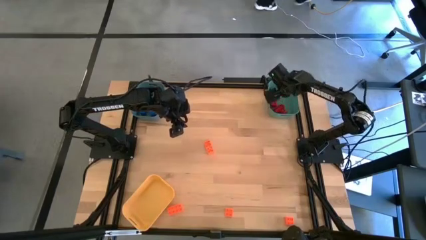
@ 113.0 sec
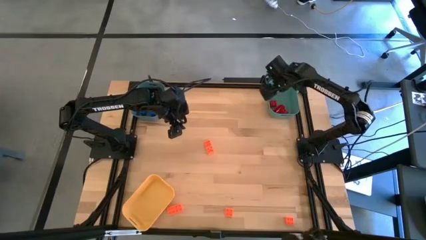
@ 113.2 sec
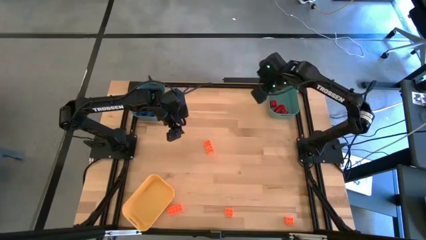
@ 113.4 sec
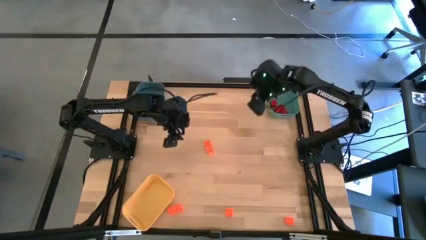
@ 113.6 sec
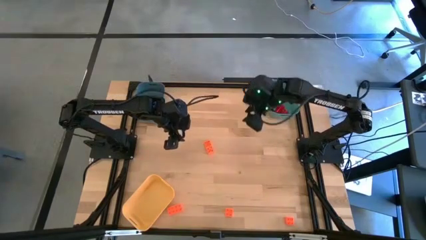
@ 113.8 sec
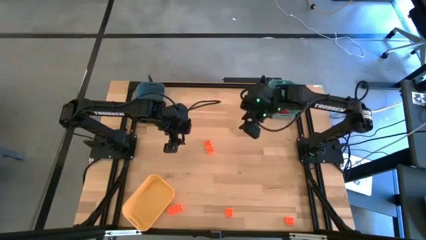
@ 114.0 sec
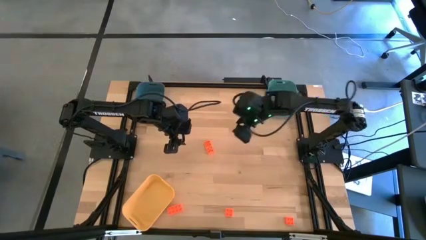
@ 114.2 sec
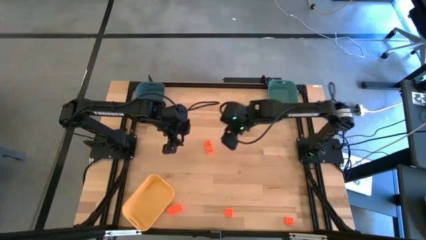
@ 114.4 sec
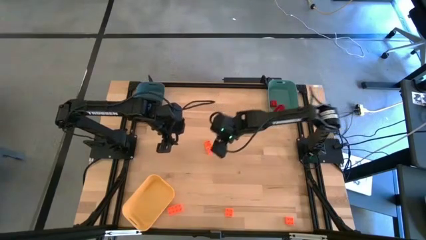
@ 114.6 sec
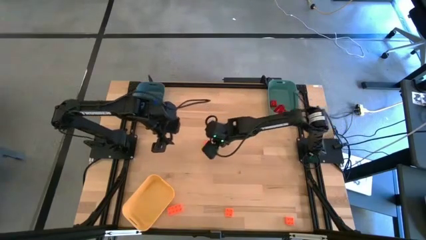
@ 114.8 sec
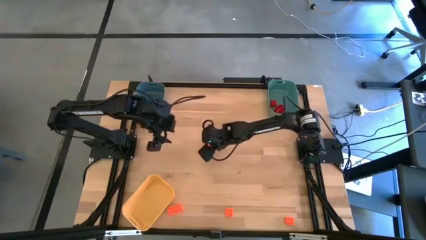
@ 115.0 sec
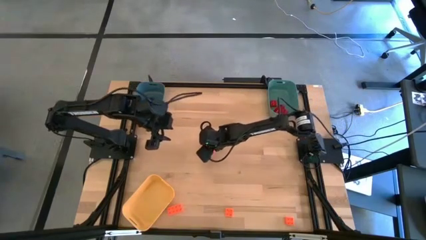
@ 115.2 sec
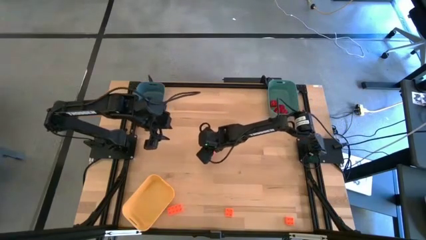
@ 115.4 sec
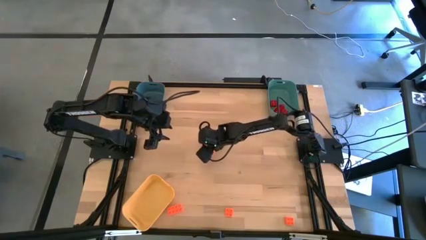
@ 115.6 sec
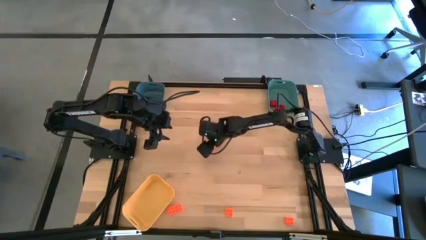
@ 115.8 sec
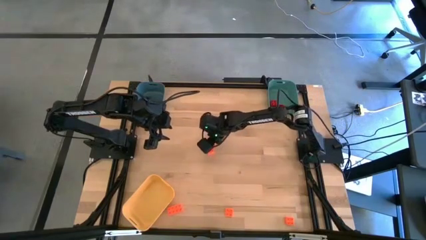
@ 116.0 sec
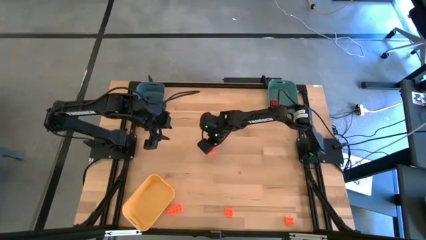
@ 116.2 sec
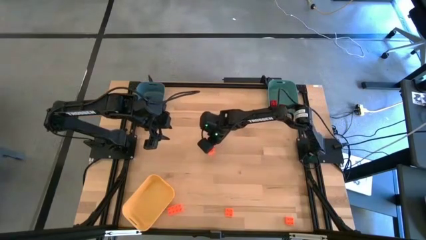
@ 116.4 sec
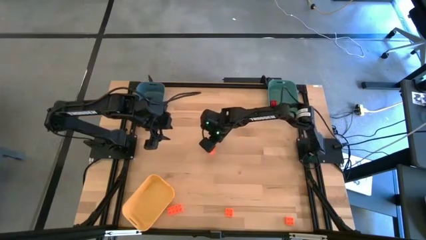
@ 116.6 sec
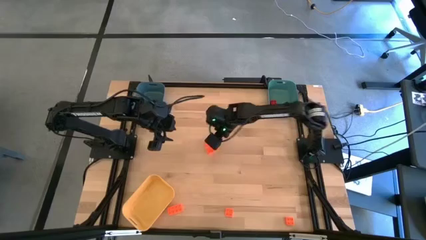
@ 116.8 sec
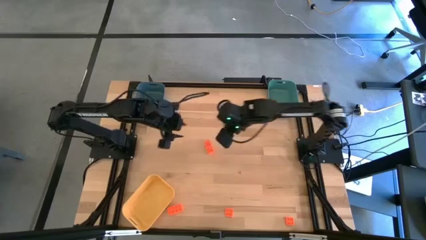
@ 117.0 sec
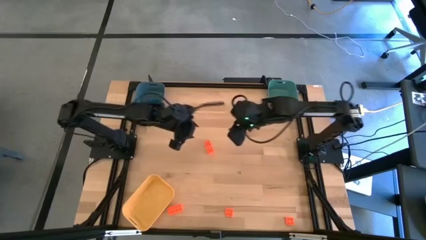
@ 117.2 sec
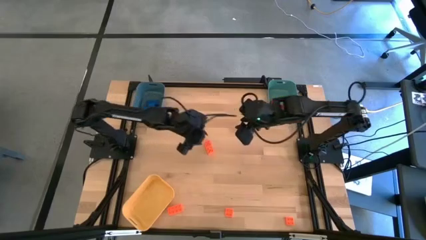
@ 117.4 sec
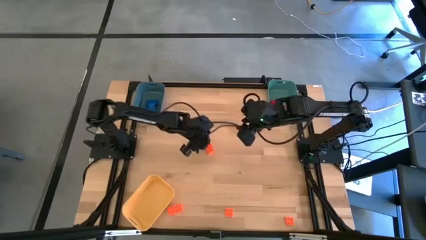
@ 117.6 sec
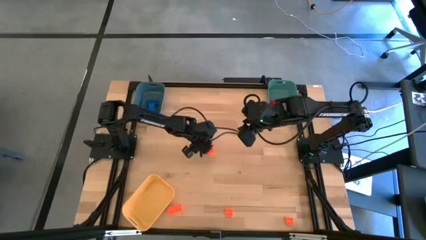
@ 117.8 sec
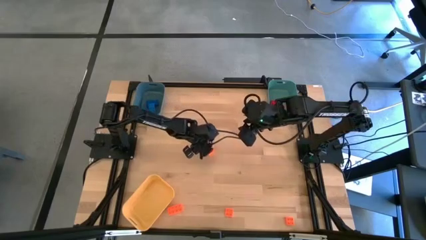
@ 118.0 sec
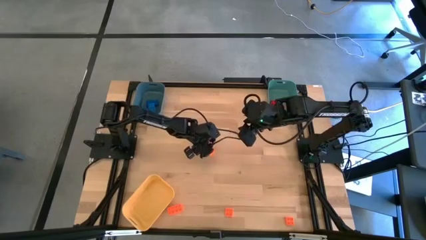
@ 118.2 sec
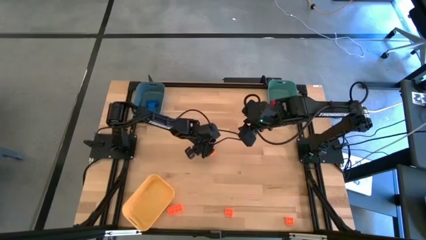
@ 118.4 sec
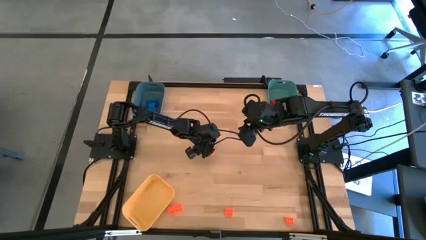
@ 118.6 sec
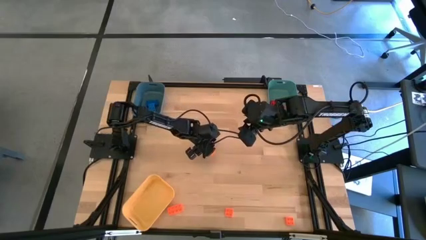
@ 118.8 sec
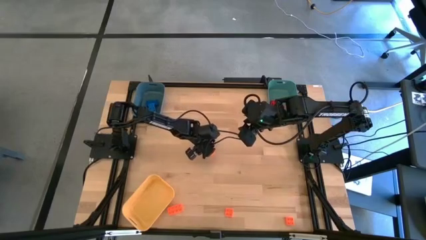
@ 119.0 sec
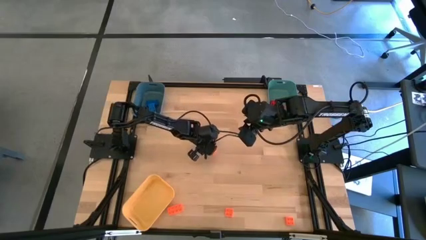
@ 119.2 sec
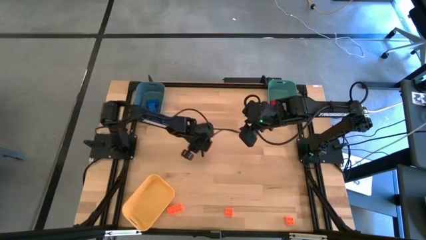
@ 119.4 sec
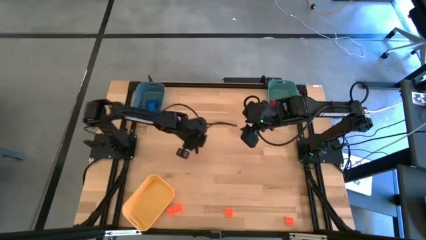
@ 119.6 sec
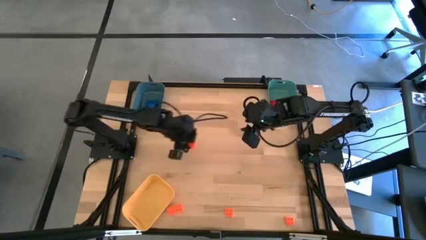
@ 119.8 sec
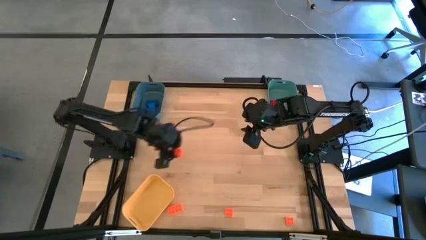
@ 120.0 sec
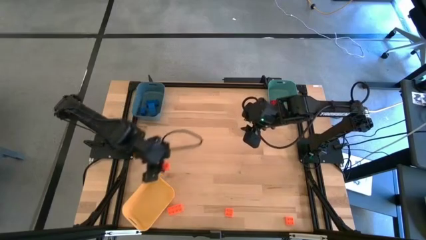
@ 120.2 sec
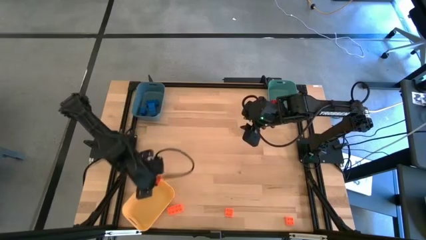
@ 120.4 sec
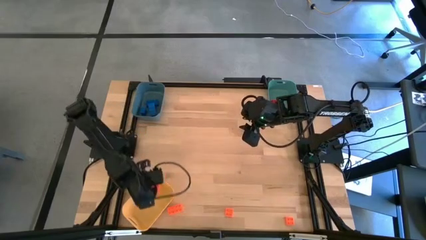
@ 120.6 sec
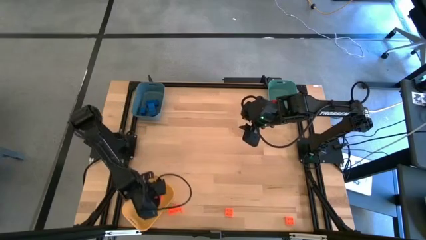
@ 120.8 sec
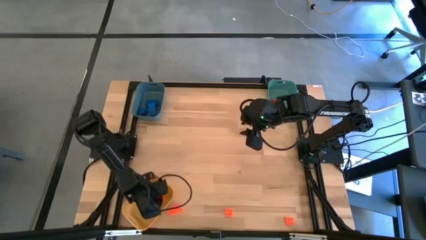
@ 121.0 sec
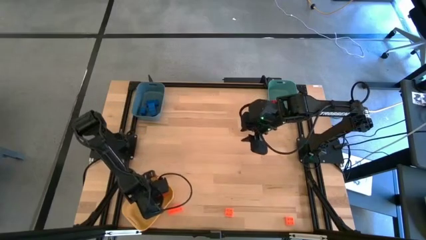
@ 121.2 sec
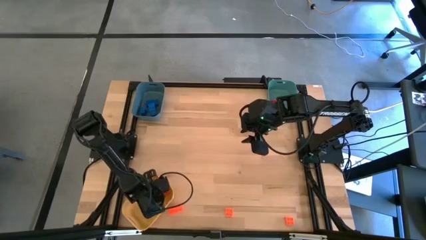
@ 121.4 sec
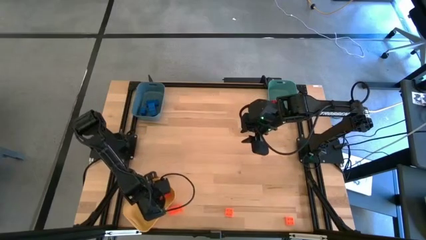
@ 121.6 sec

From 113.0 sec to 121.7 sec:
Task: Sort & place blocks by color
Put the top orange game piece into the yellow bin

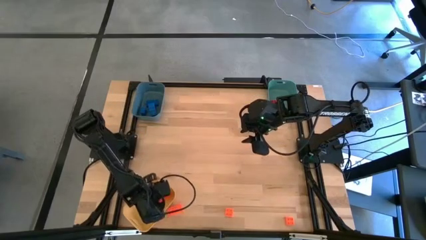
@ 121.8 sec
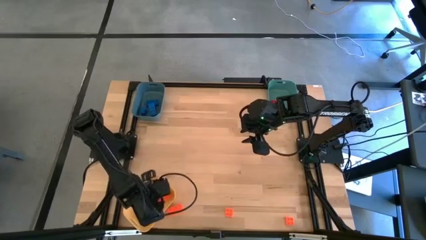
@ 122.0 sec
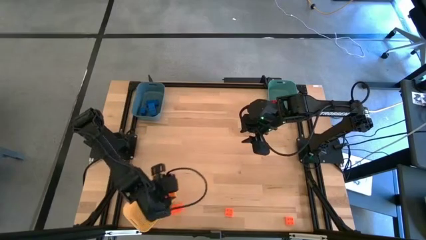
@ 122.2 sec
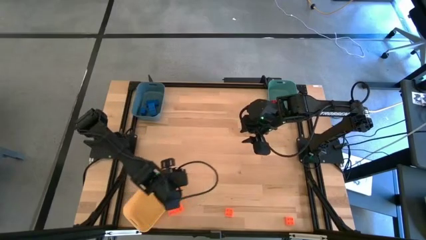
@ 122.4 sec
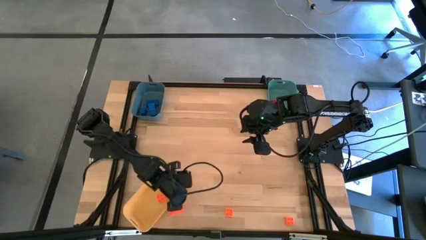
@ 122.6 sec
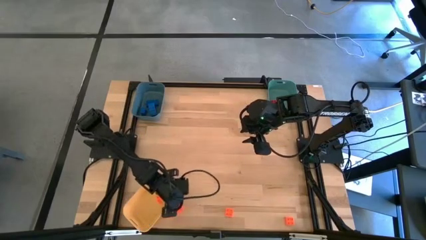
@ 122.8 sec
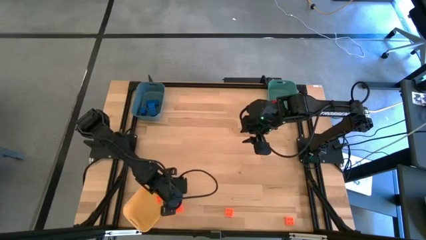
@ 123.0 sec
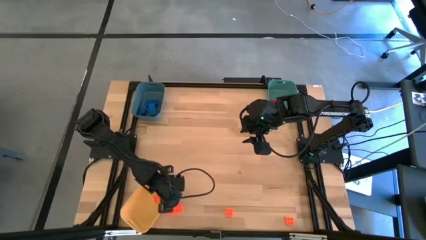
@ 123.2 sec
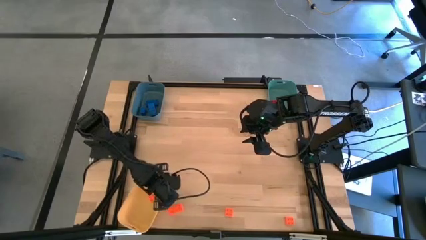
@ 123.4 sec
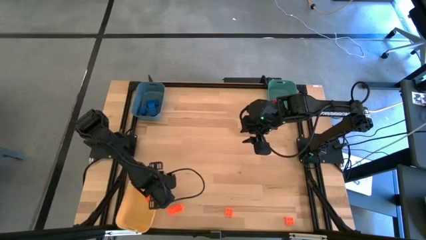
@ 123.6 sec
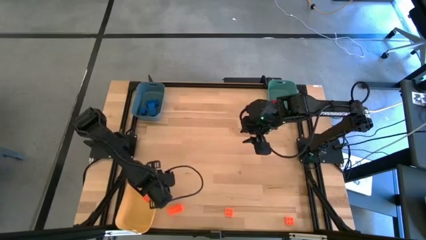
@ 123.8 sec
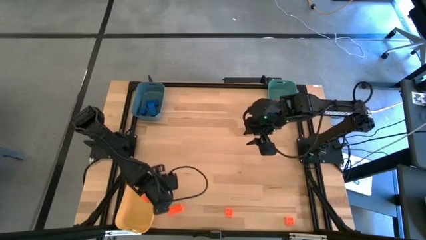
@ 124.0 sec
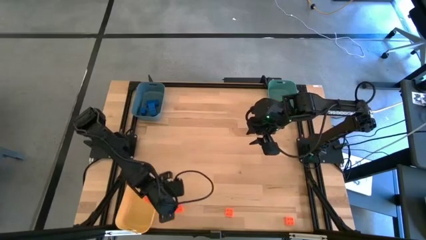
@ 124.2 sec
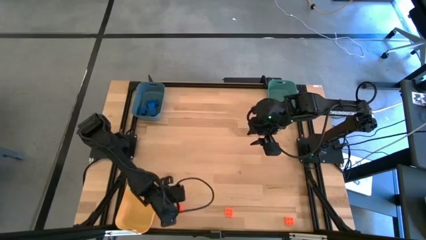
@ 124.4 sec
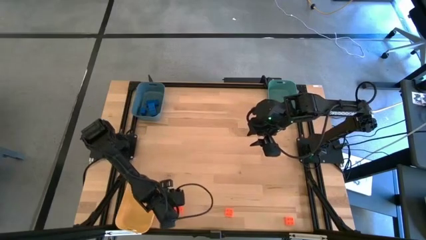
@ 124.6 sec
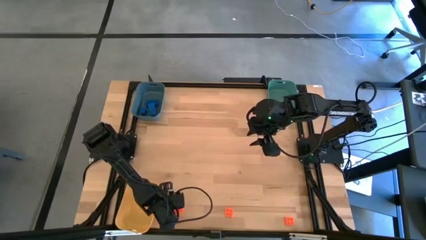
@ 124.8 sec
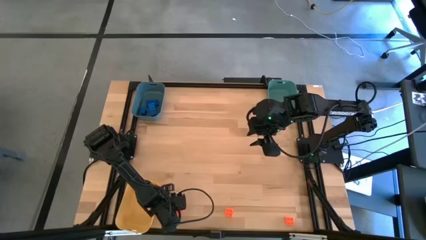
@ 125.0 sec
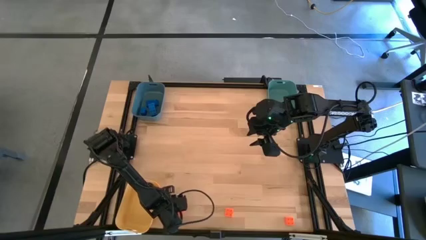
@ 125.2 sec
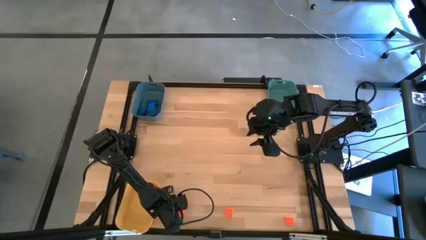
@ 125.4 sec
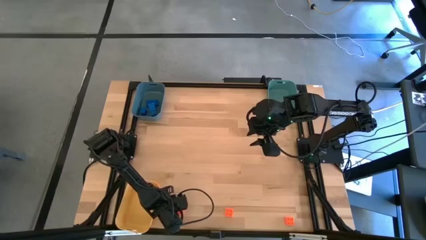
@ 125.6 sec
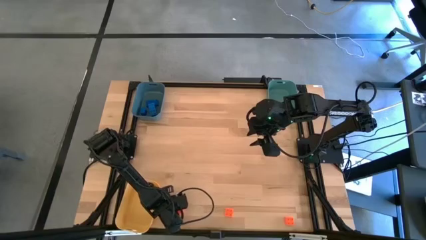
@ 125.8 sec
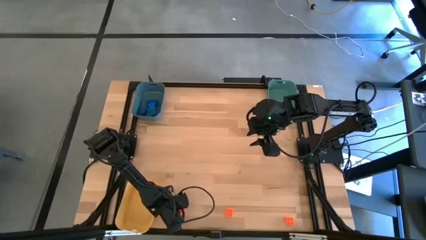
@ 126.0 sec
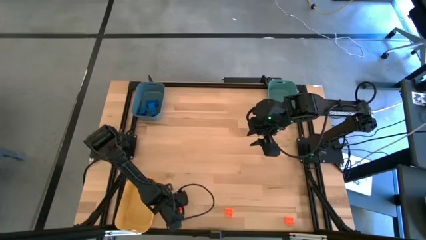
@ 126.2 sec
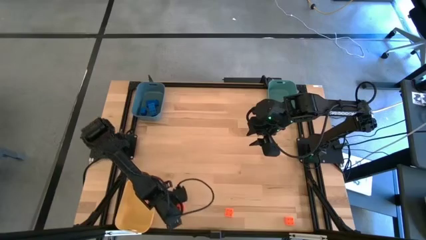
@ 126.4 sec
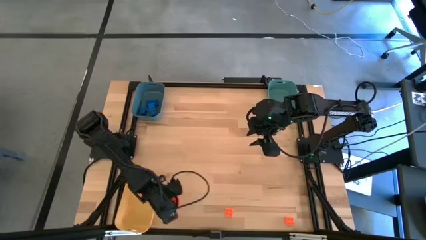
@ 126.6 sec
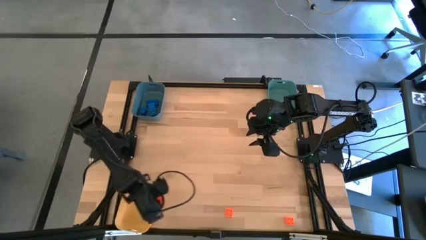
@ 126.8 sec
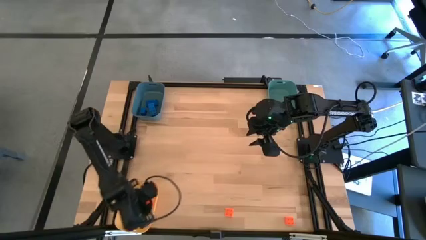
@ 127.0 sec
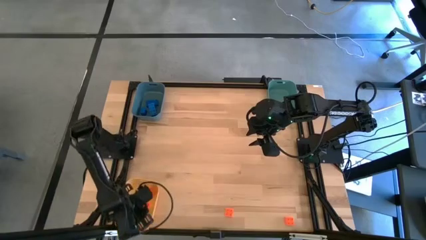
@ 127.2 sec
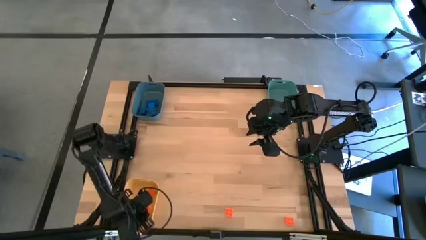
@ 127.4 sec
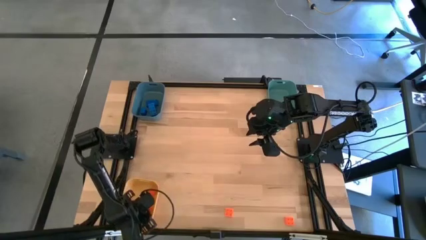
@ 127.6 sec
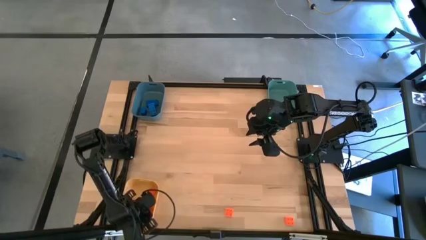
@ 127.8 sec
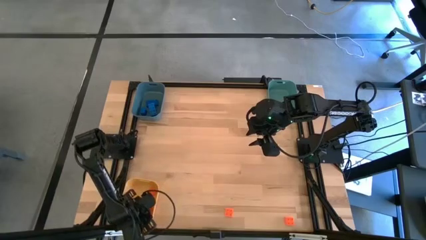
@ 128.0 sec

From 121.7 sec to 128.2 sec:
Put the left orange game piece into the yellow bin
